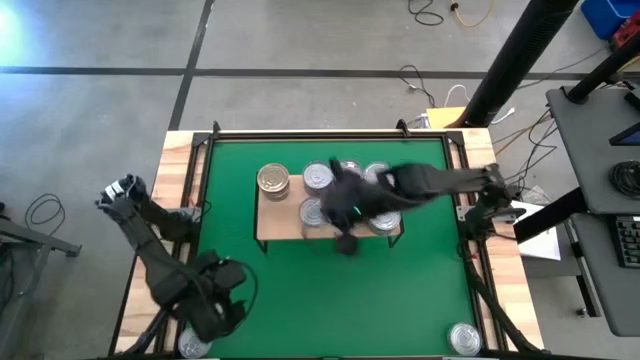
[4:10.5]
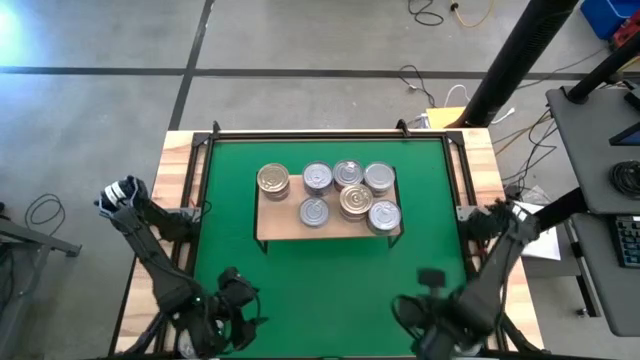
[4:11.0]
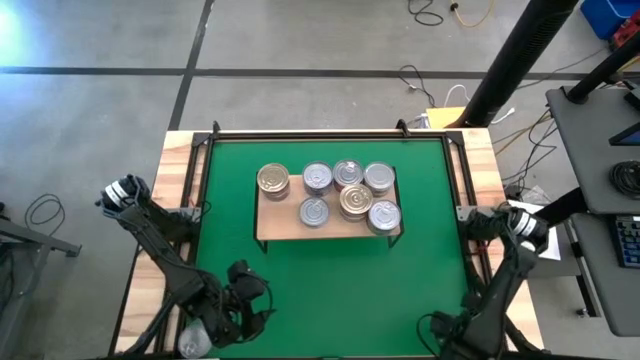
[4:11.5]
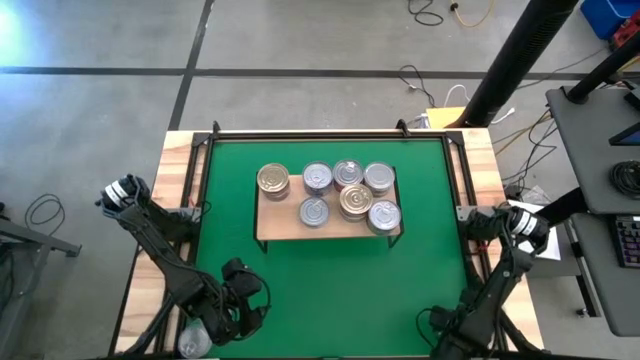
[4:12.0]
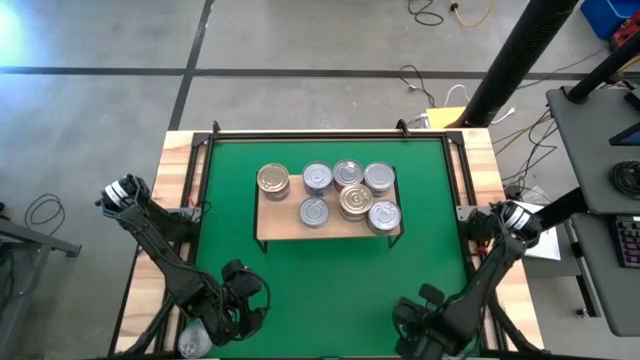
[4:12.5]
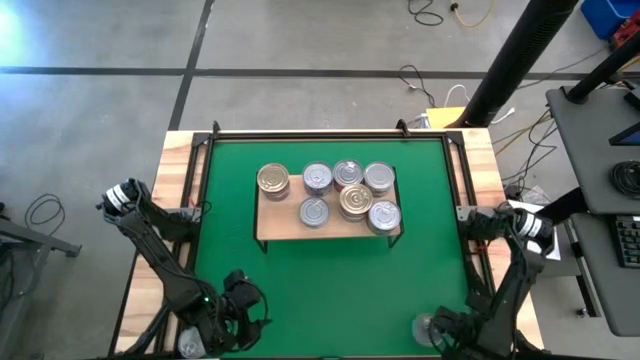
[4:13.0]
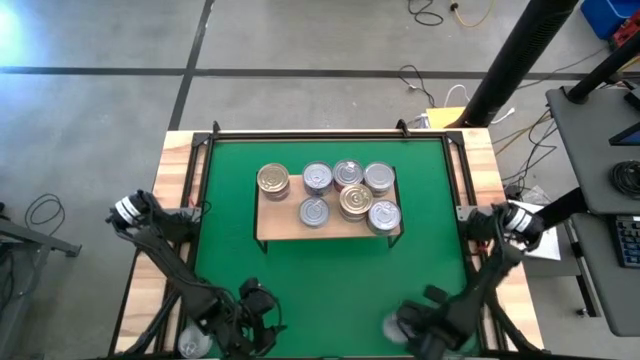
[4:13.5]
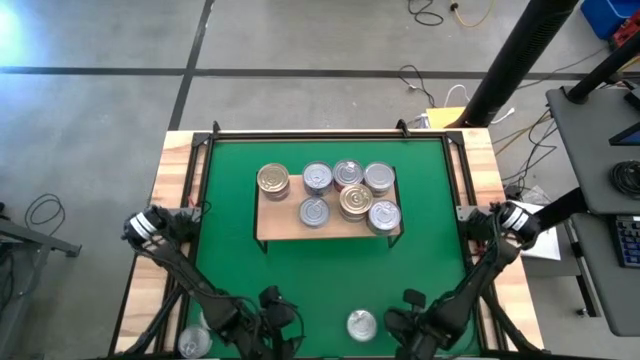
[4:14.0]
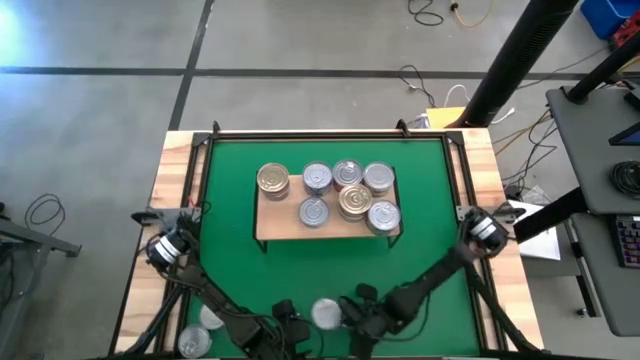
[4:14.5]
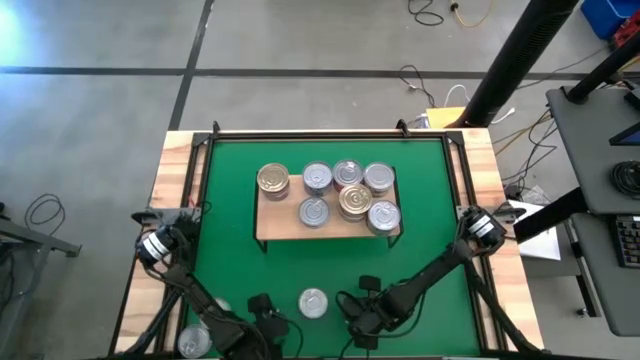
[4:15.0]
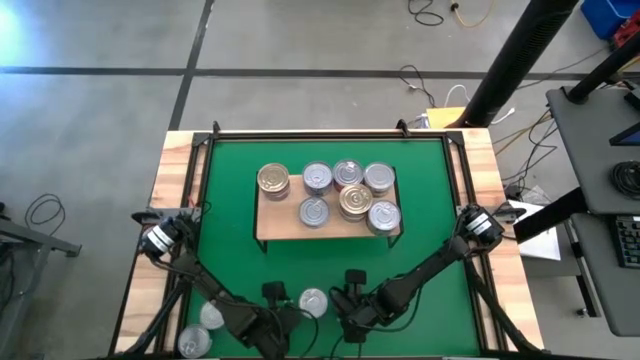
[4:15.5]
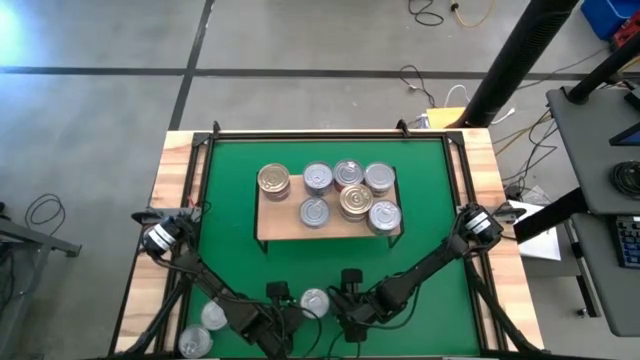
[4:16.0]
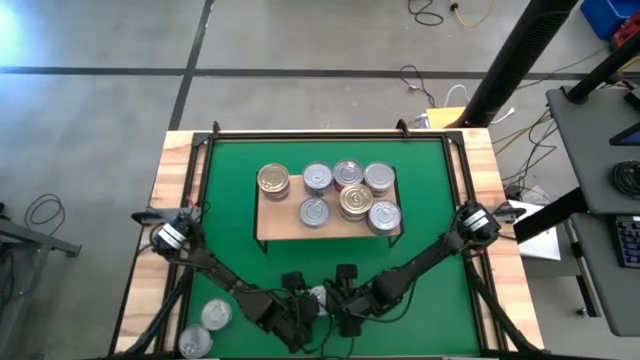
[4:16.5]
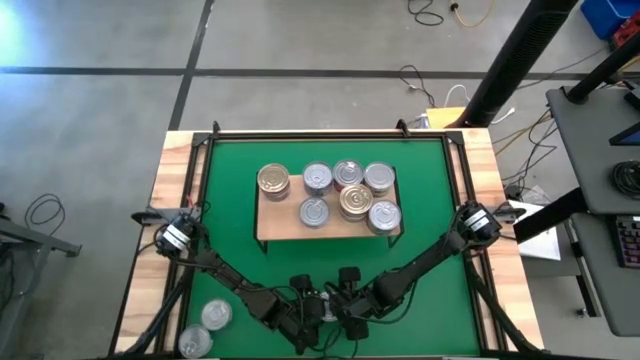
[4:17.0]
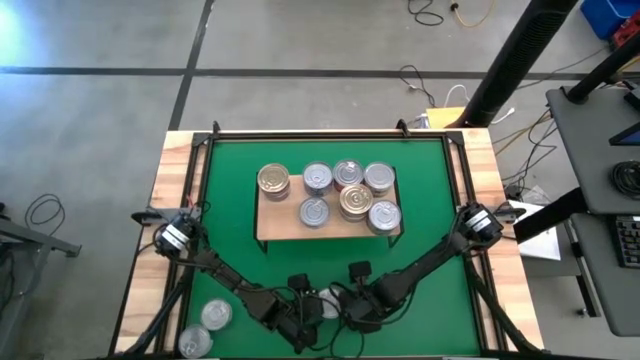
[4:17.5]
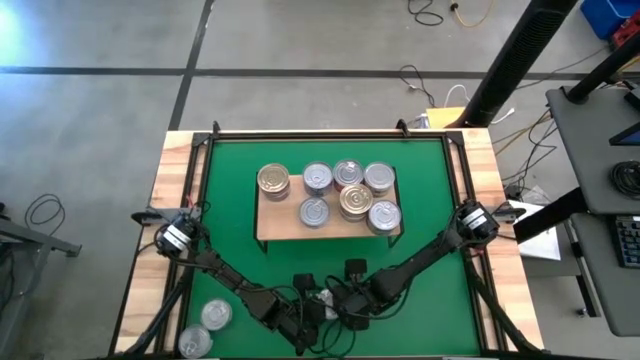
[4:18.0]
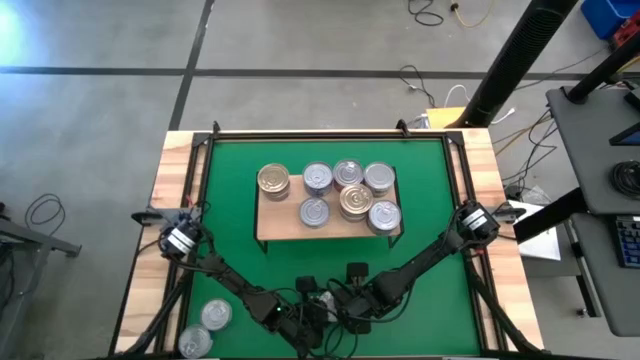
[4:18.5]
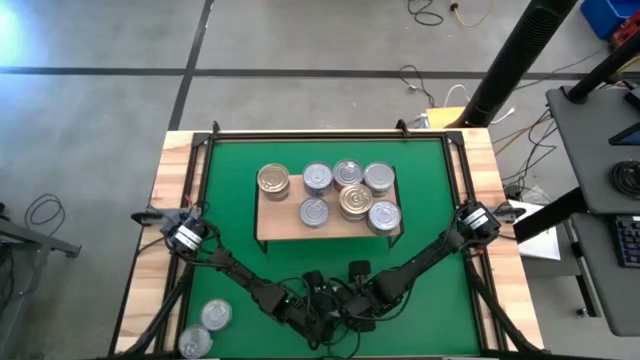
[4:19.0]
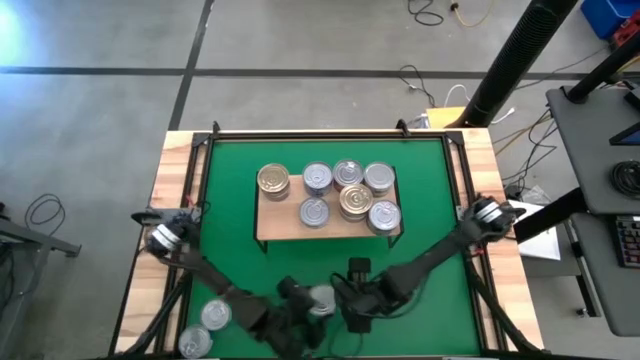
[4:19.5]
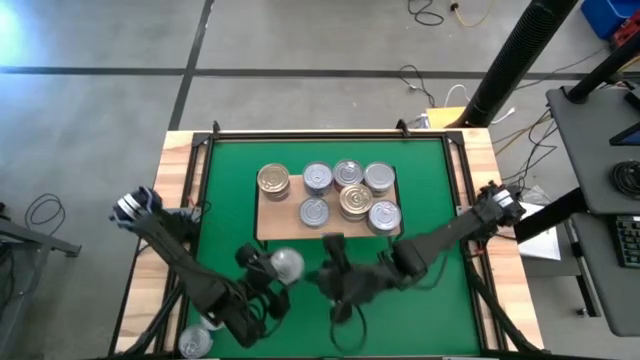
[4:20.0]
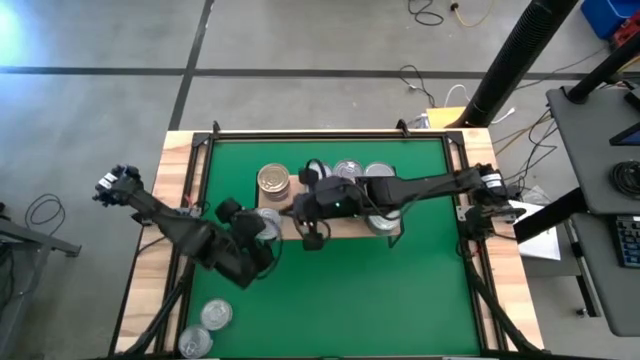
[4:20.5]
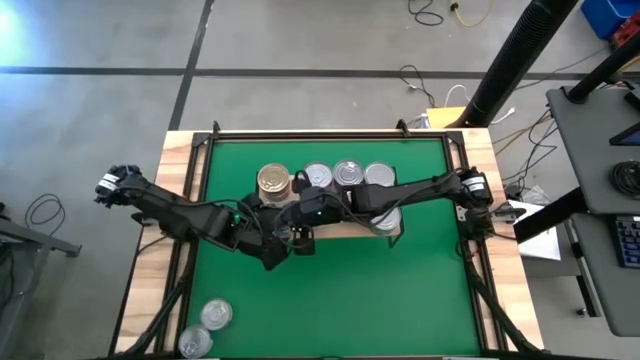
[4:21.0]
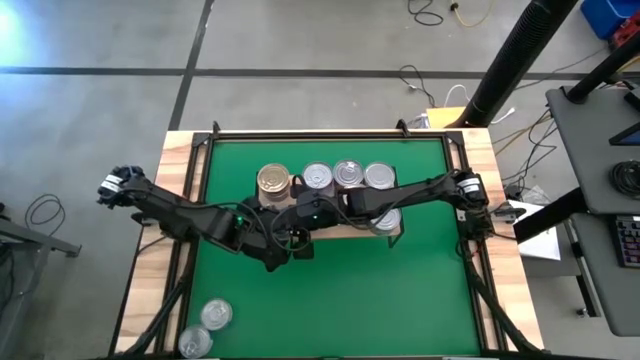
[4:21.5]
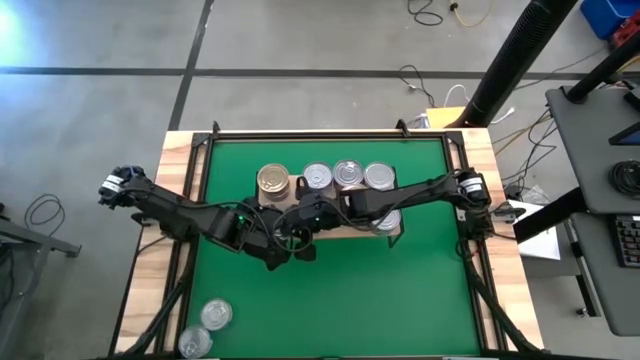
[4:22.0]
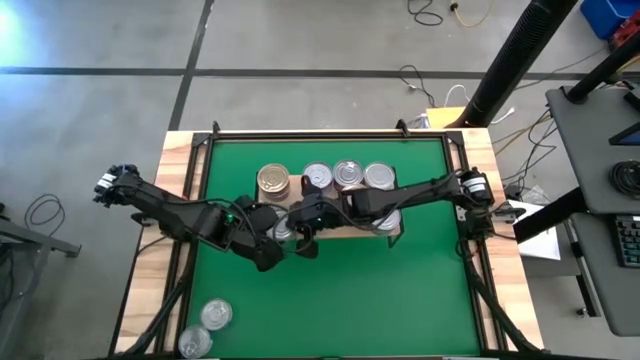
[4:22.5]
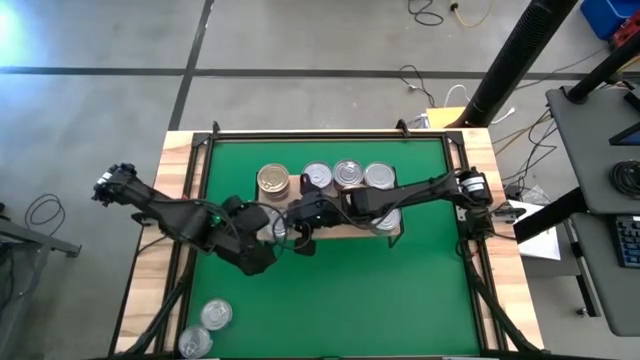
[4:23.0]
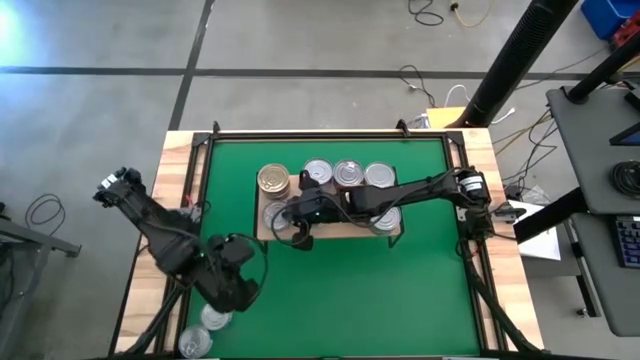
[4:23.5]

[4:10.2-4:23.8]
Task: Stack canned seafood by type on shelf
Put the right yellow and blue tuna can on the shelf

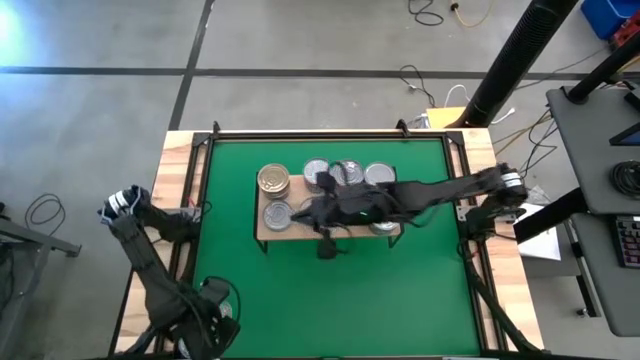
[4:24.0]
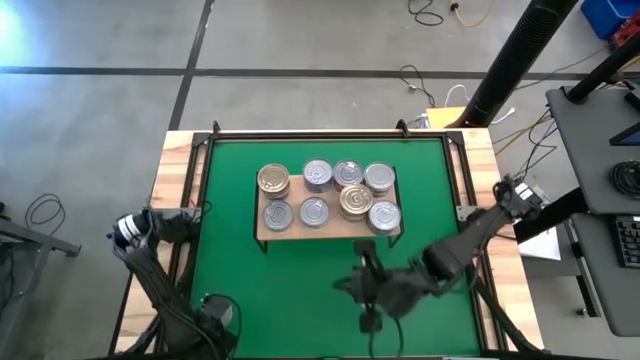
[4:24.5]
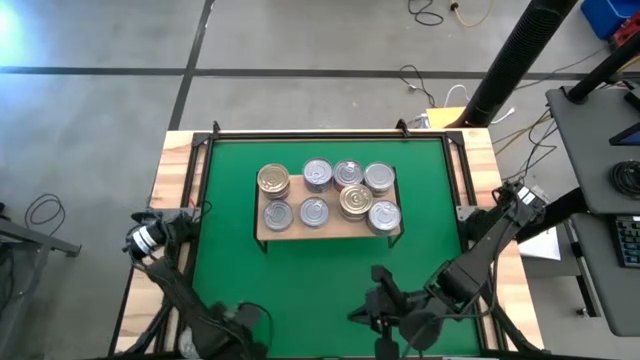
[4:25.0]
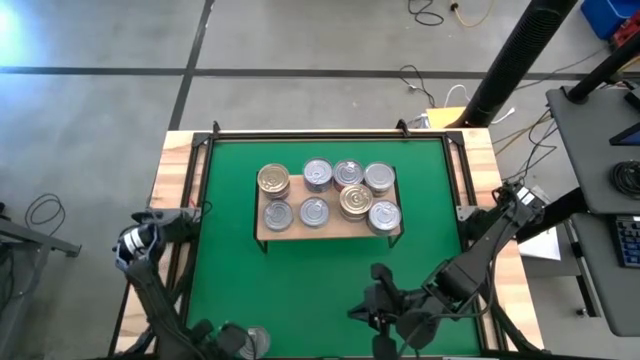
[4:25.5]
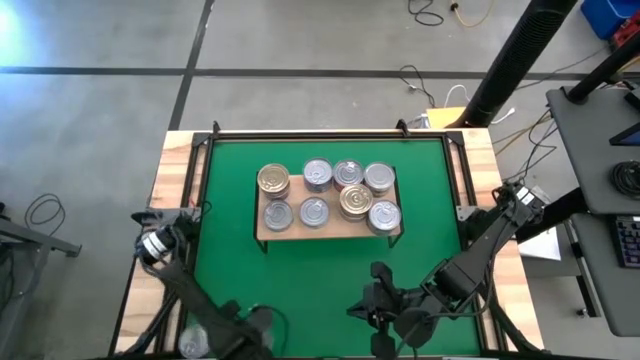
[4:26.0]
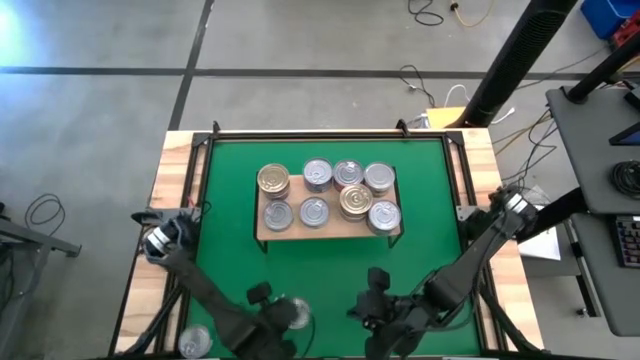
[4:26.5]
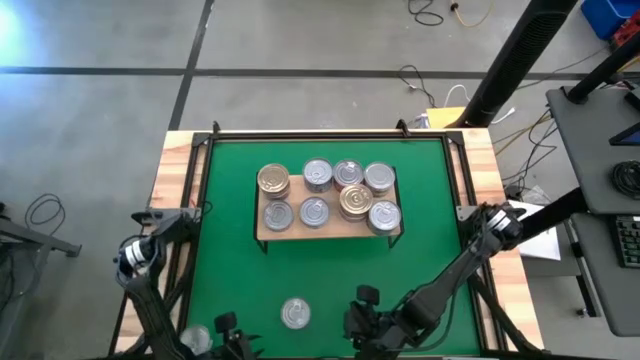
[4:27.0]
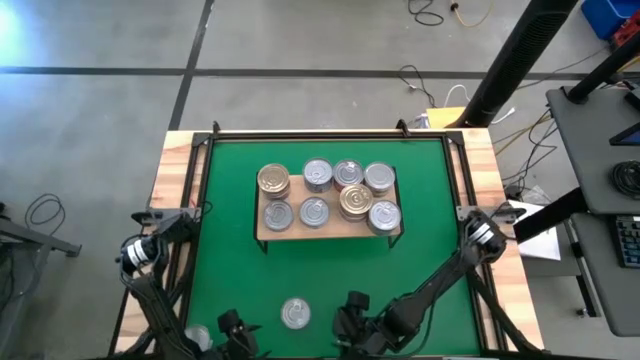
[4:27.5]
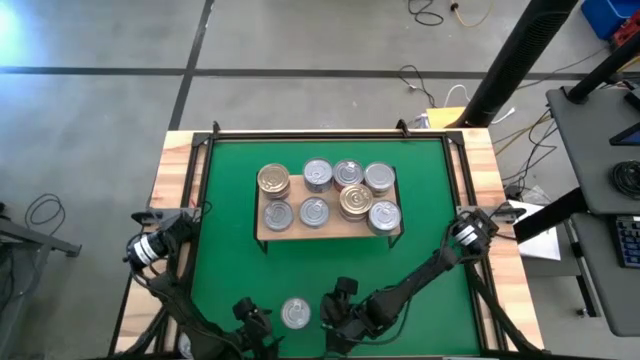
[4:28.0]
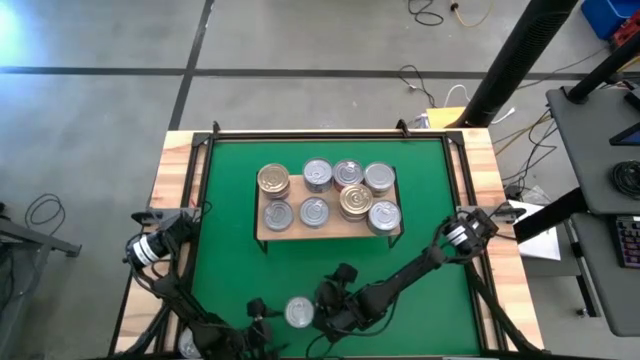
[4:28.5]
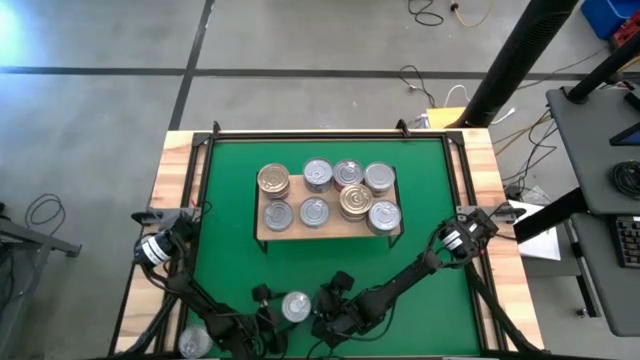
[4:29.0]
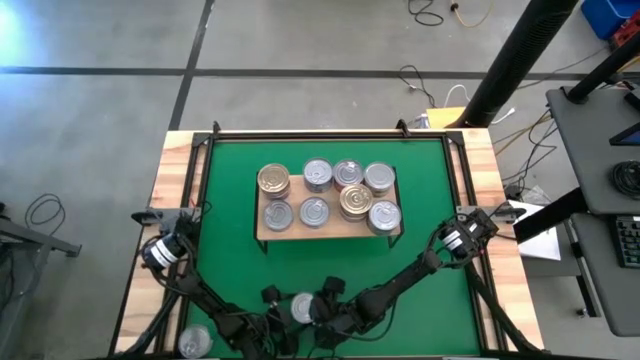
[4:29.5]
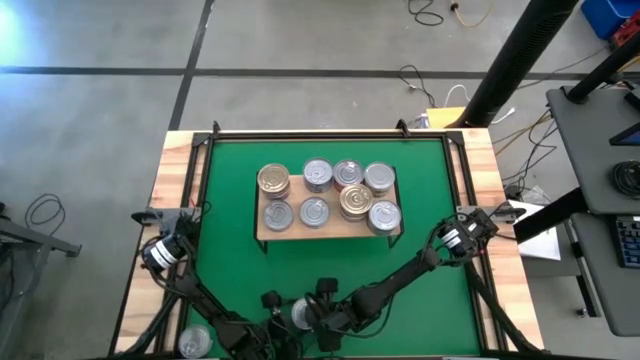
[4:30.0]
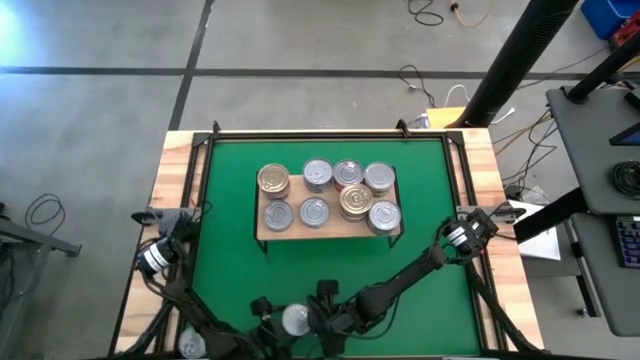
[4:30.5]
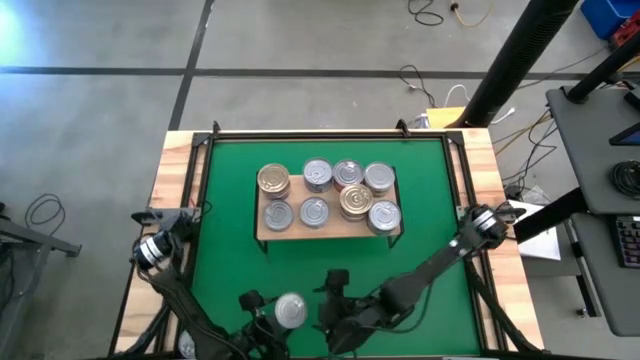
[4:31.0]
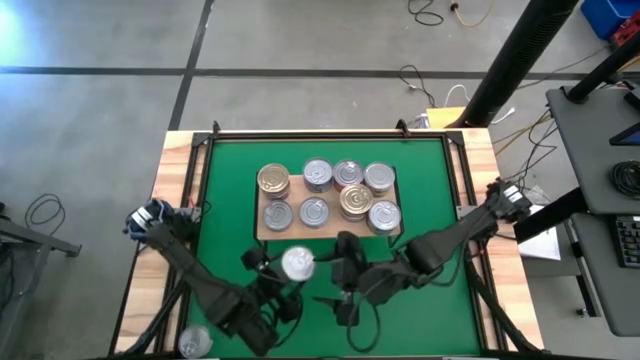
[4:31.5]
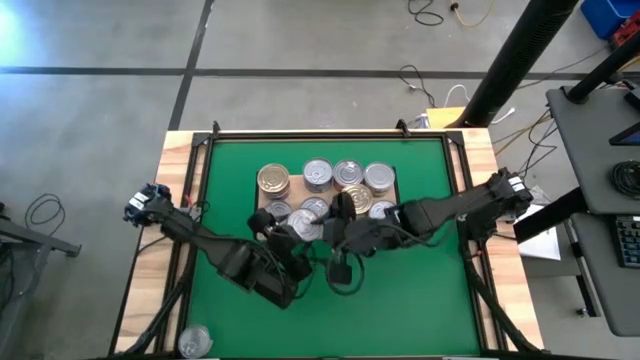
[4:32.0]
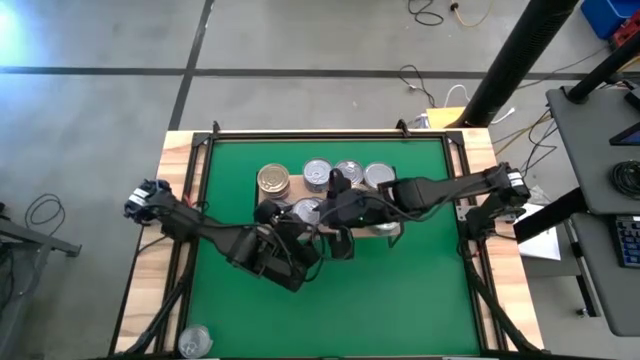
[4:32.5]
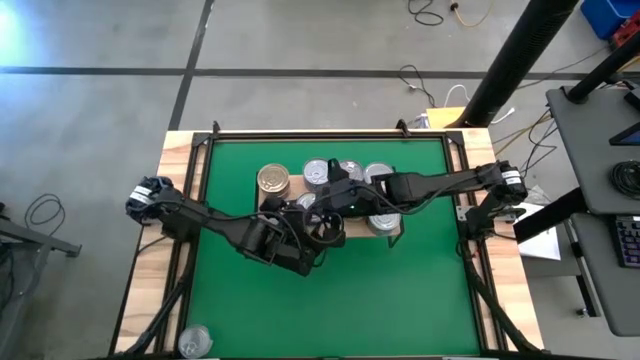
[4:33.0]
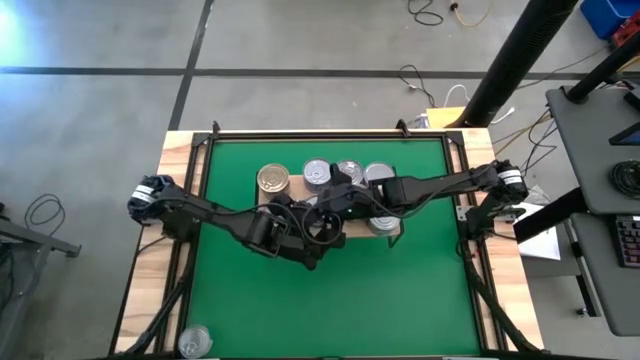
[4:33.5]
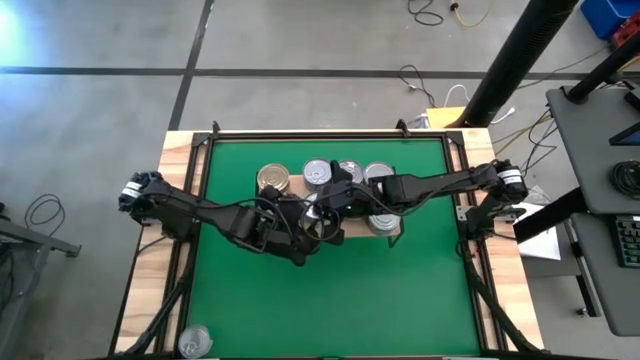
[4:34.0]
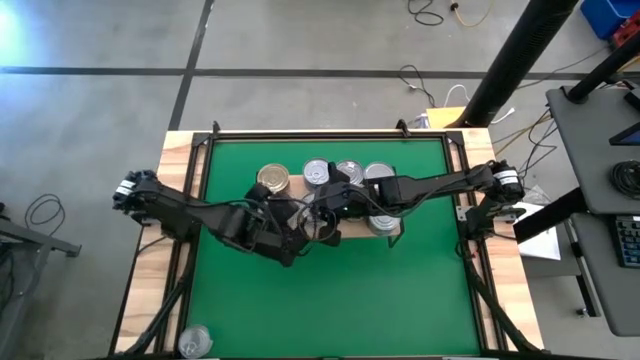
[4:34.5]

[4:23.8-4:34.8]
Stack the green and blue tuna can on top of the green and blue tuna can on the shelf
